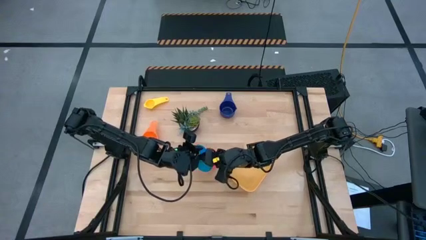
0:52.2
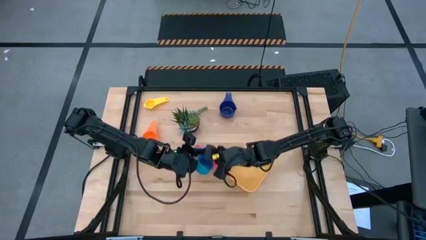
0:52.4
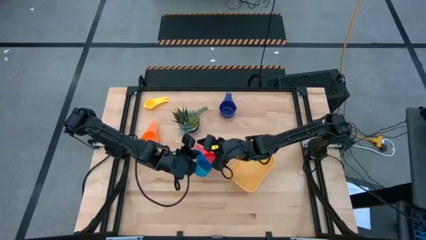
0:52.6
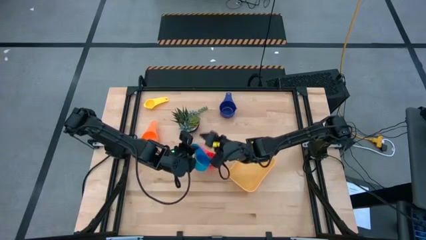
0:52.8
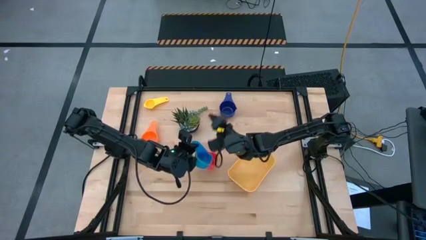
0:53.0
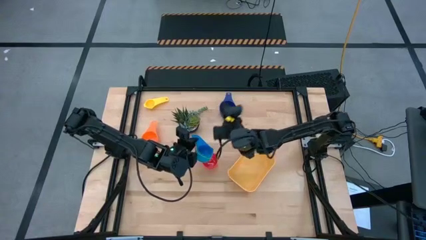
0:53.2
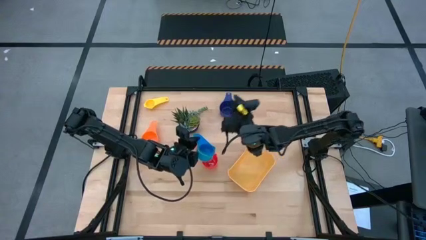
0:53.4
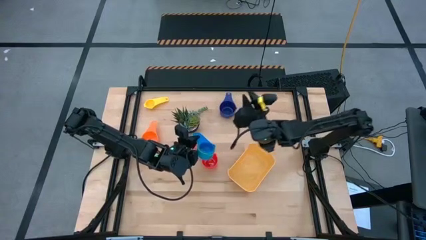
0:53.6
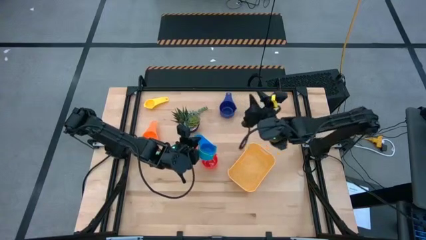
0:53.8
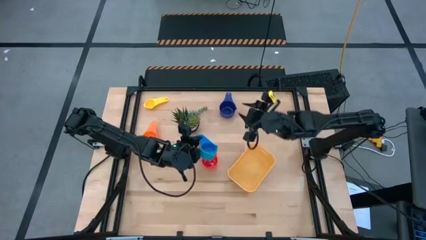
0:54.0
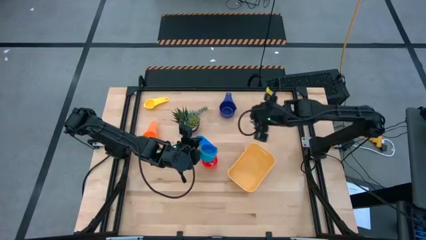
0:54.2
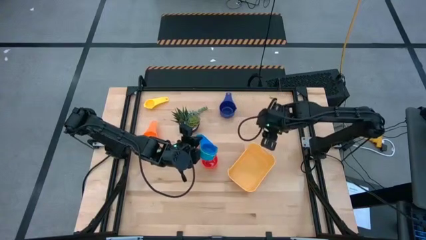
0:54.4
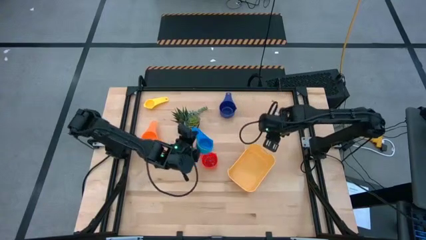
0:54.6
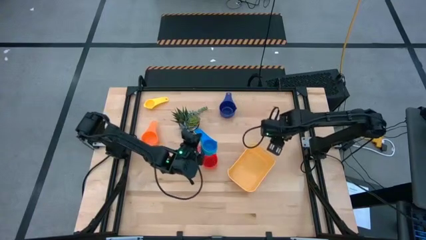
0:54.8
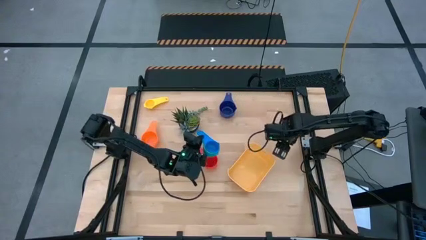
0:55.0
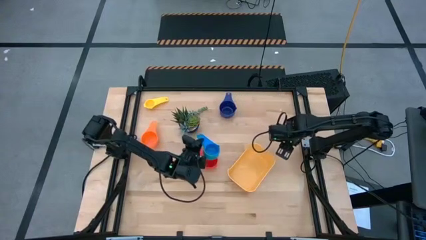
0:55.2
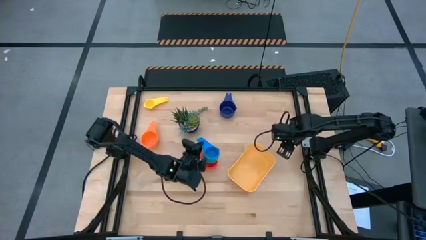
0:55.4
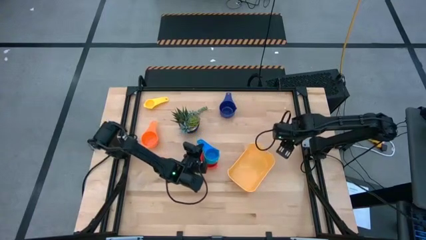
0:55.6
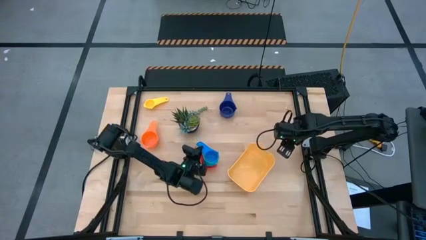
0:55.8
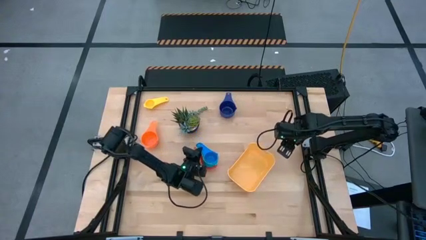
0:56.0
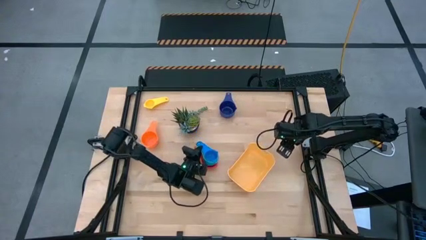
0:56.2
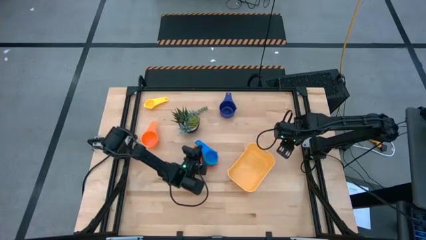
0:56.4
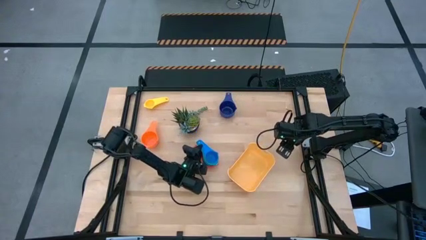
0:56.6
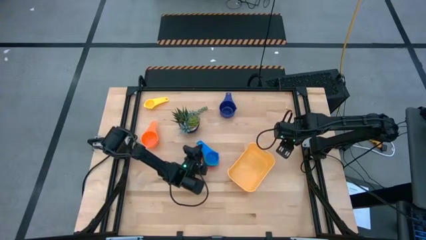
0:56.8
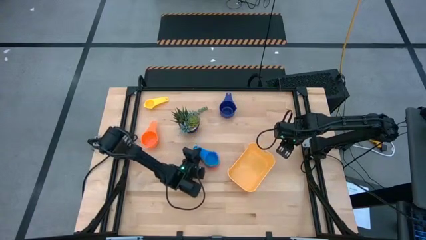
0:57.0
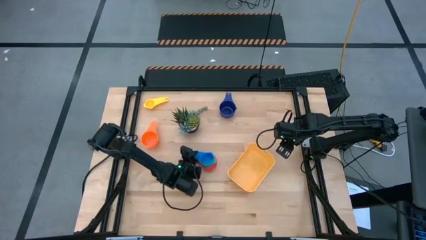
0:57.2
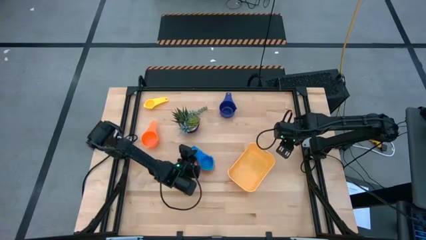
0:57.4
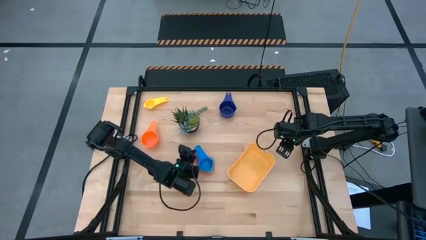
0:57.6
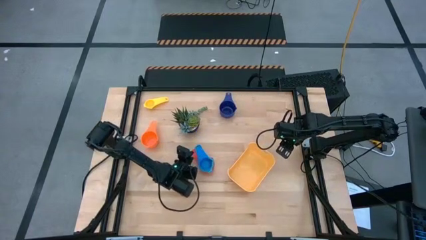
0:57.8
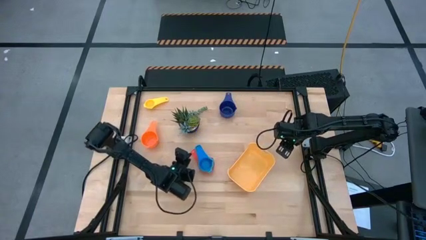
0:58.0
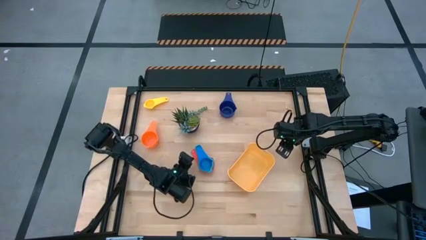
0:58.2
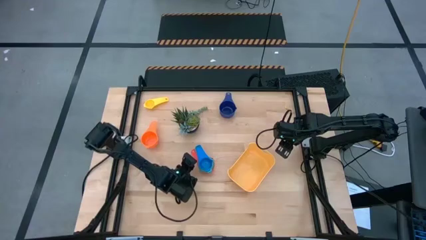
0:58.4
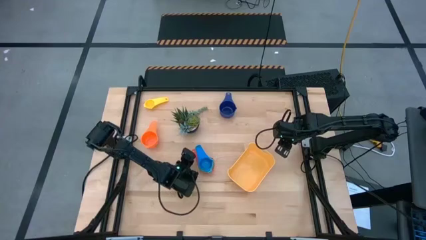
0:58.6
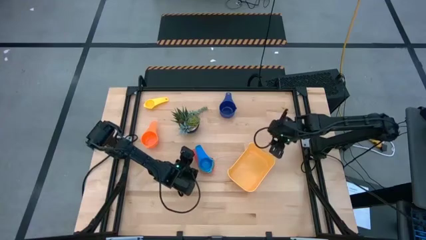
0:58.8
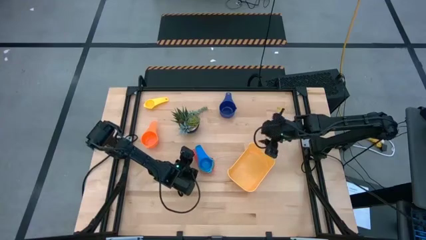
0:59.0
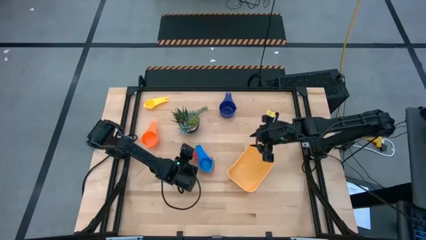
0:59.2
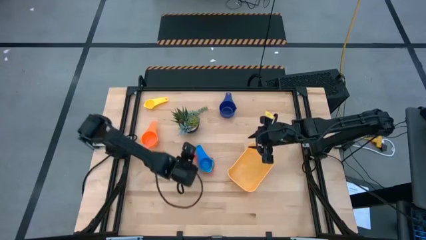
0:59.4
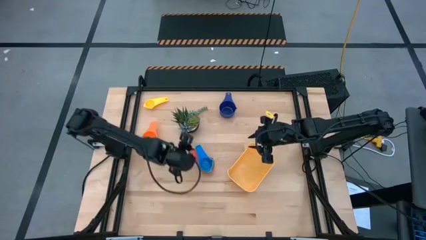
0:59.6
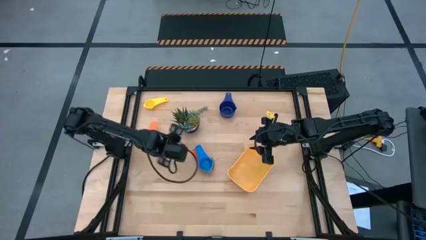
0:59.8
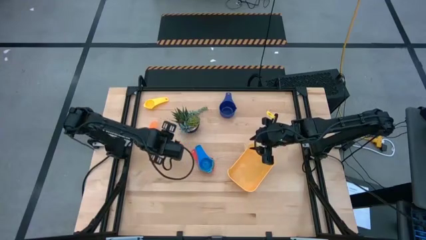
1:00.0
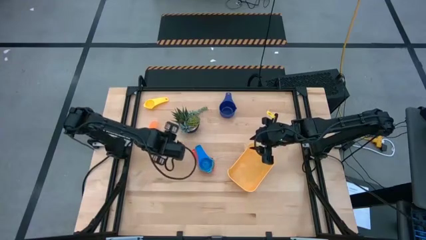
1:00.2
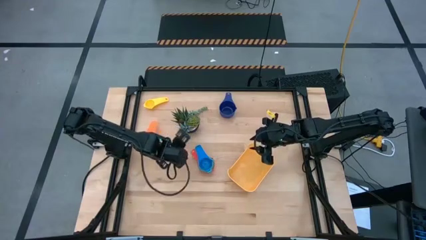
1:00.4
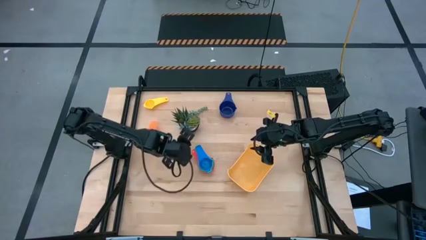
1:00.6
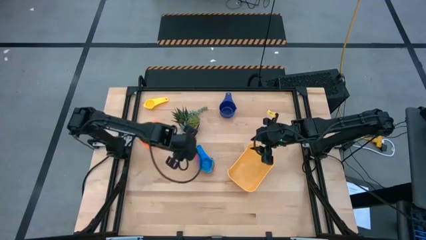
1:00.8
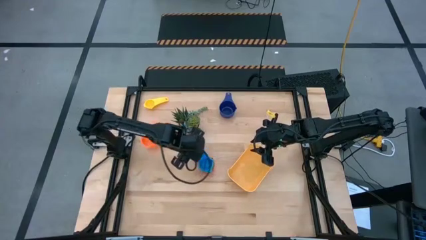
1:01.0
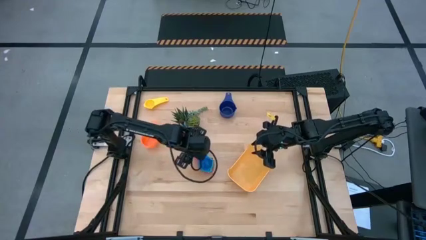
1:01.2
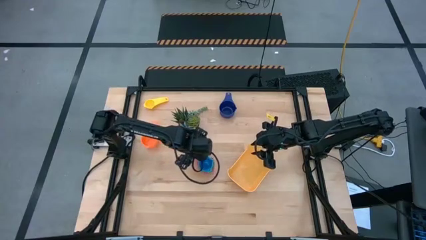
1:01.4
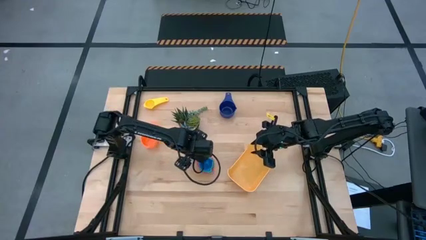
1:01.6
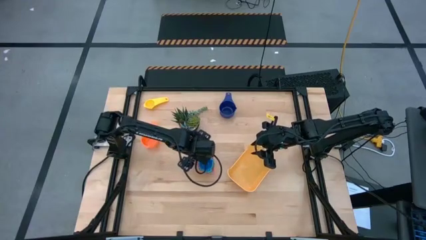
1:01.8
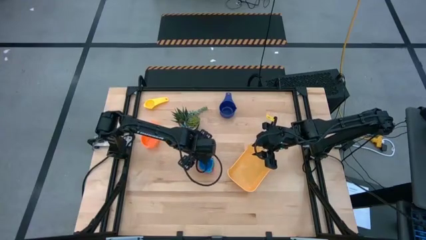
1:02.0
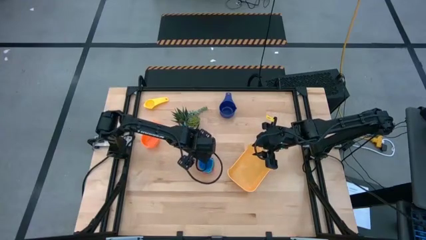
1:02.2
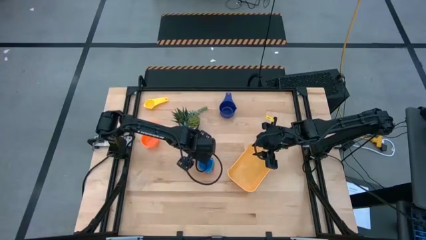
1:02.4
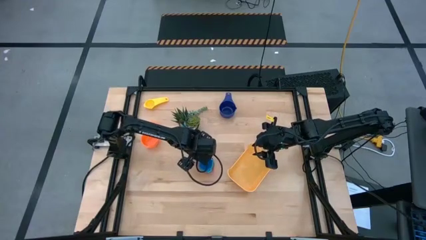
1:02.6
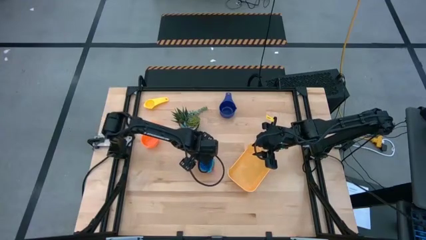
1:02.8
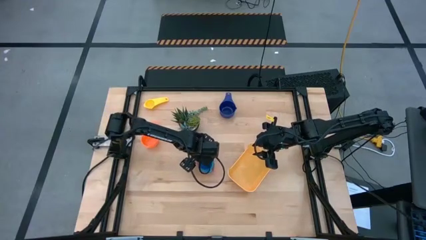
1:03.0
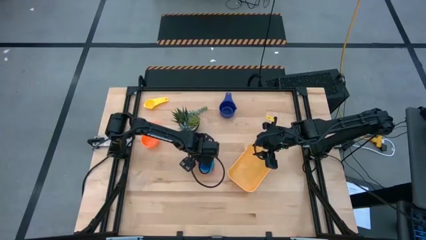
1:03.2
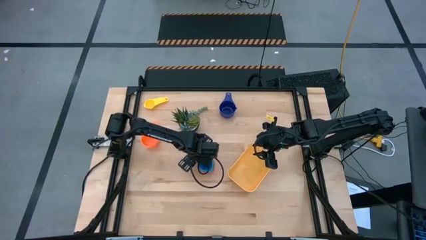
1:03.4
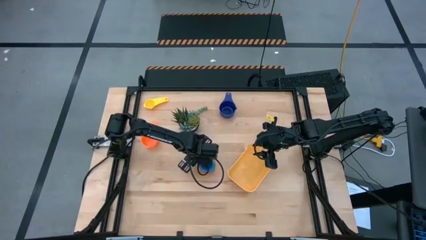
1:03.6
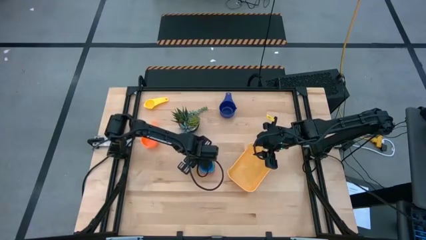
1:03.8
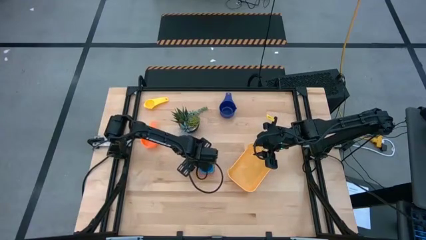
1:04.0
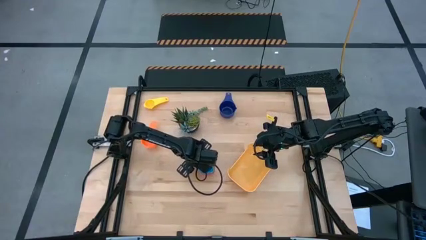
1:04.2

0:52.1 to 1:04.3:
Task: Nest measuring cups in basket
Stack the measuring cups on the red measuring cup

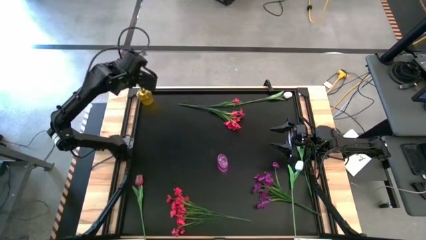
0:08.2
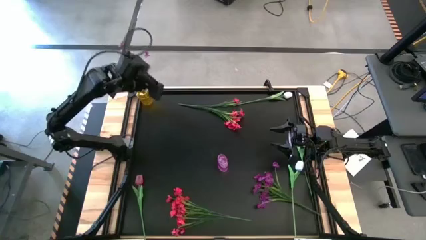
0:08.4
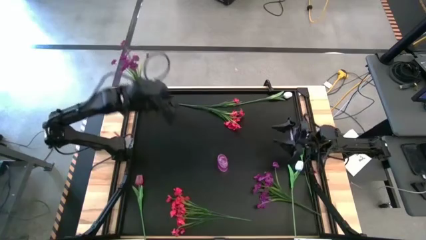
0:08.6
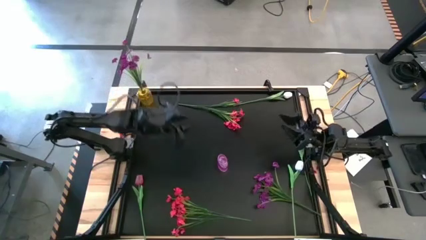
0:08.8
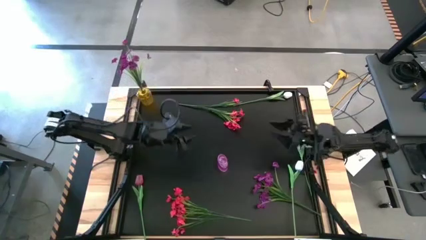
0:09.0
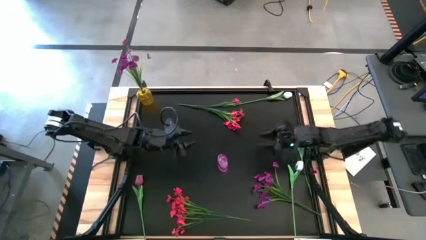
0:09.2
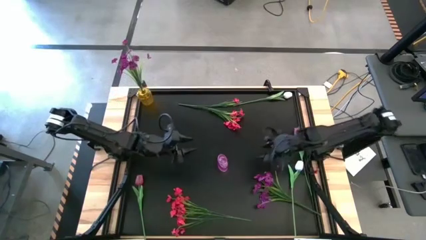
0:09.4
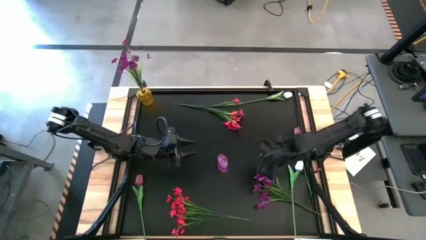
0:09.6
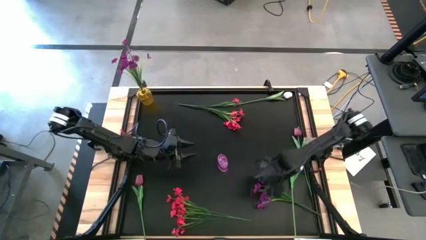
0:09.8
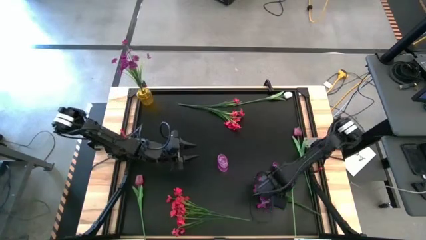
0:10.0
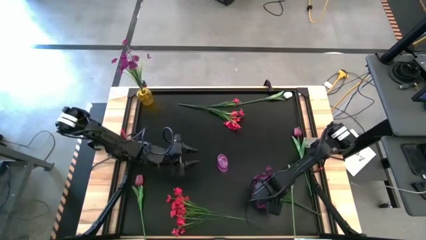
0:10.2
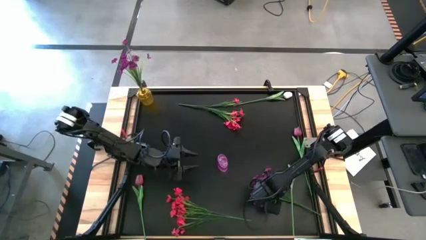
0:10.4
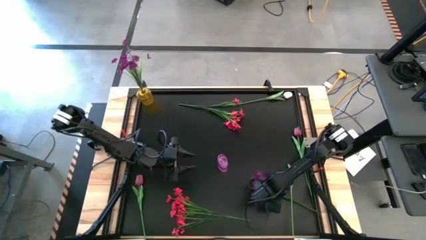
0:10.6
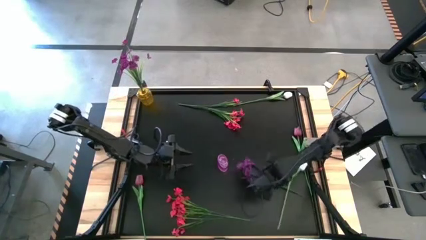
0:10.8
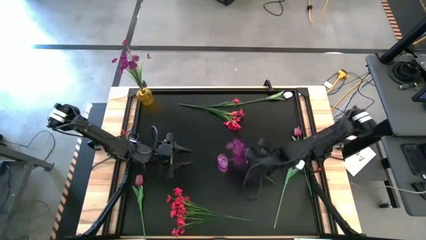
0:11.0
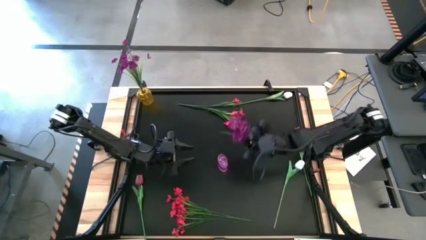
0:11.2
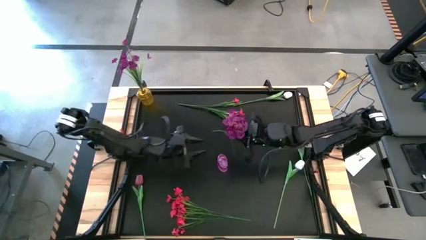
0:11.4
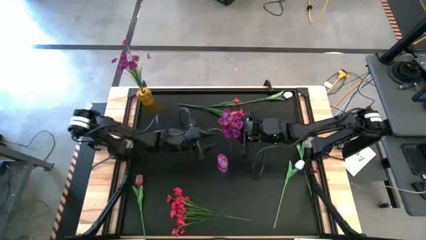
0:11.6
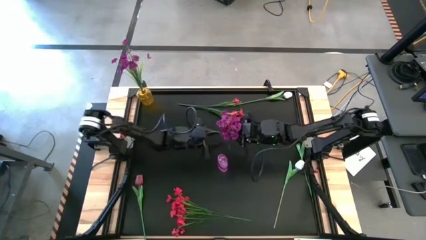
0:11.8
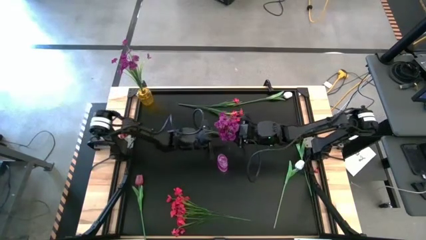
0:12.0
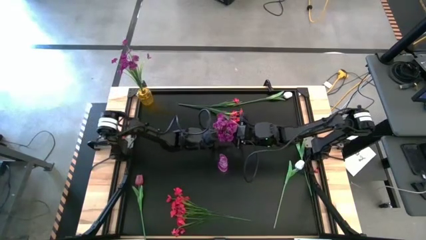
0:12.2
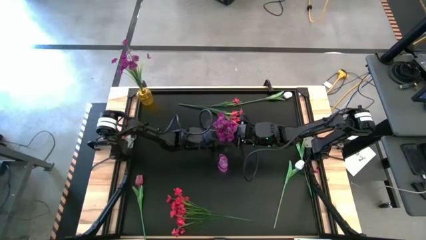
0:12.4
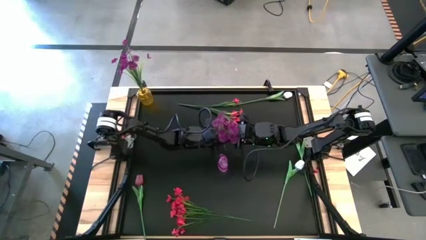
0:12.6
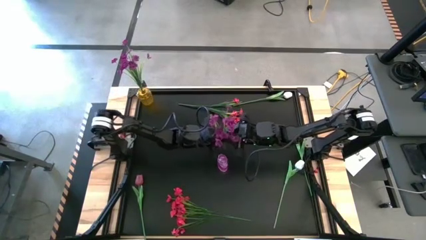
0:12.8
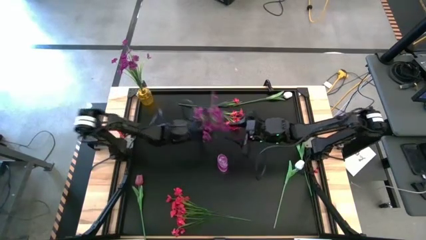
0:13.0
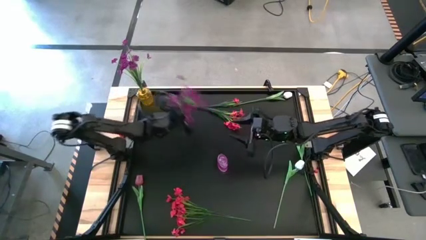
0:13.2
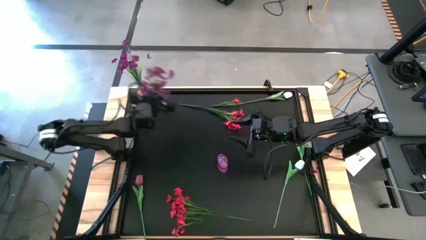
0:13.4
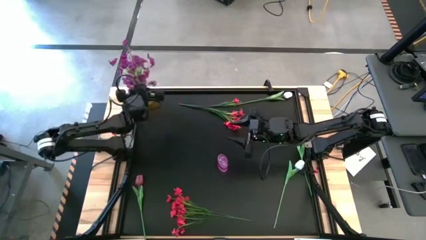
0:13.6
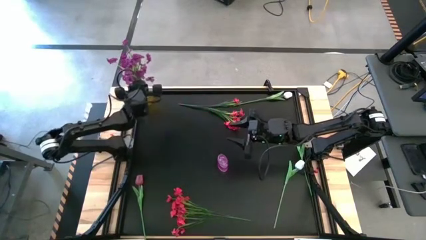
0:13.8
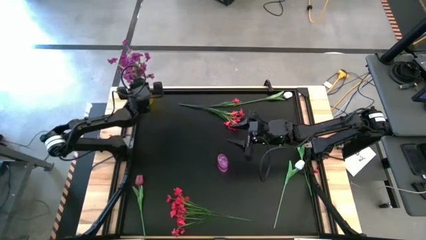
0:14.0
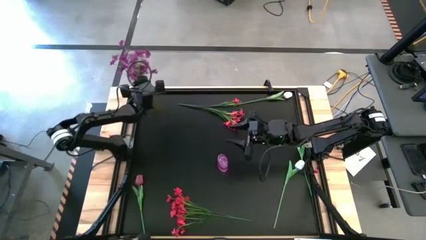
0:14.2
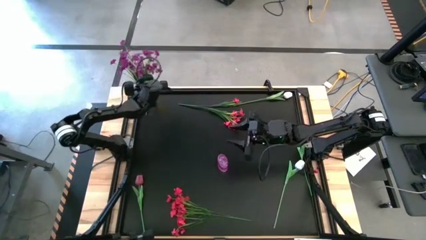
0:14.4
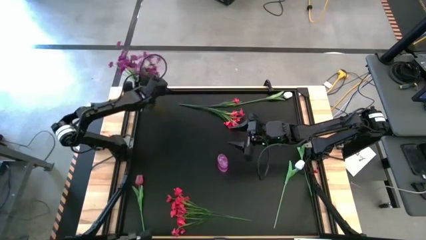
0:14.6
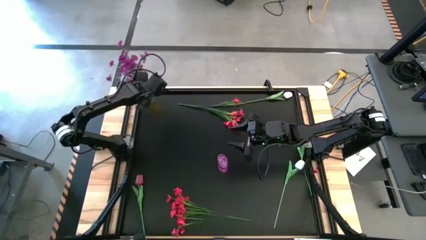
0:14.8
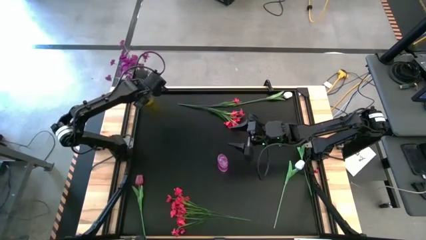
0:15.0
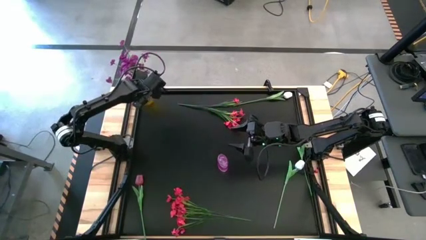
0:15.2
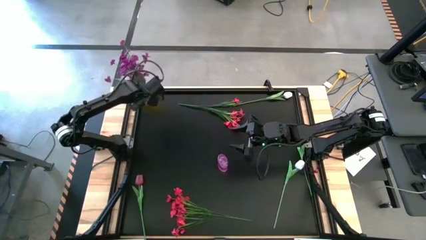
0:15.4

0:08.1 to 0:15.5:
Task: Sort flowers into vase by color
Put the violet flower into the yellow vase
